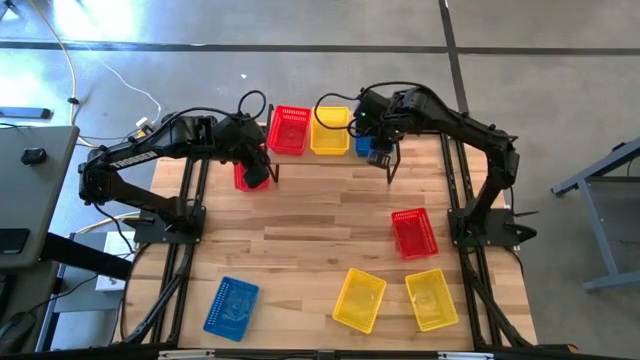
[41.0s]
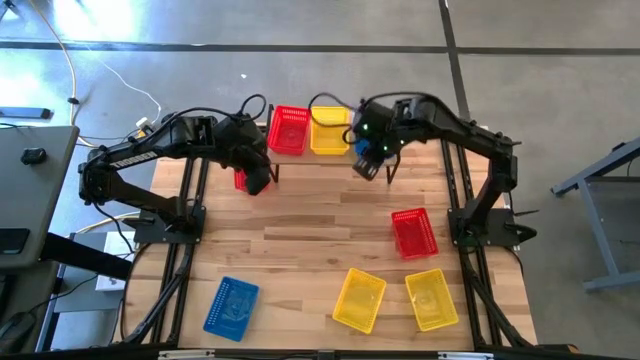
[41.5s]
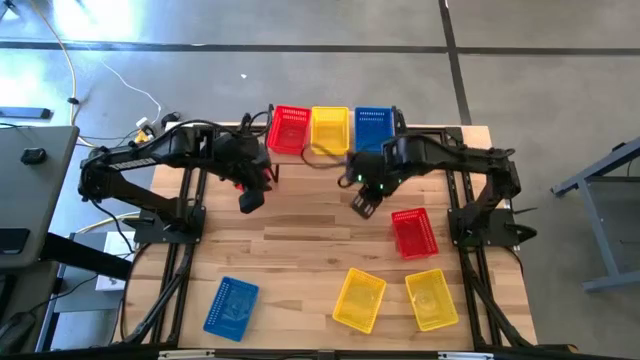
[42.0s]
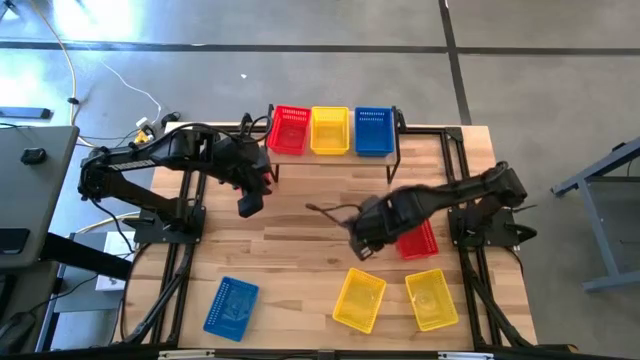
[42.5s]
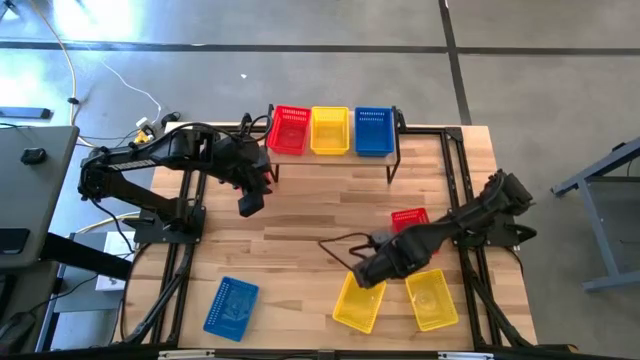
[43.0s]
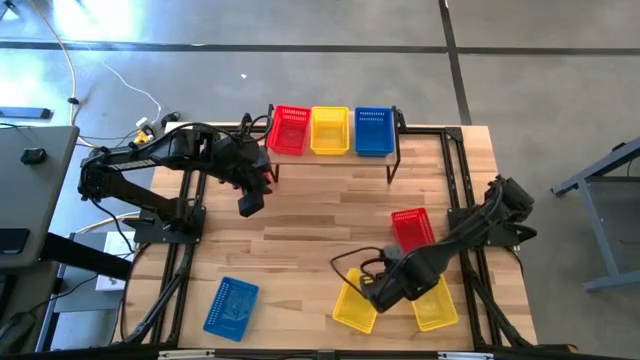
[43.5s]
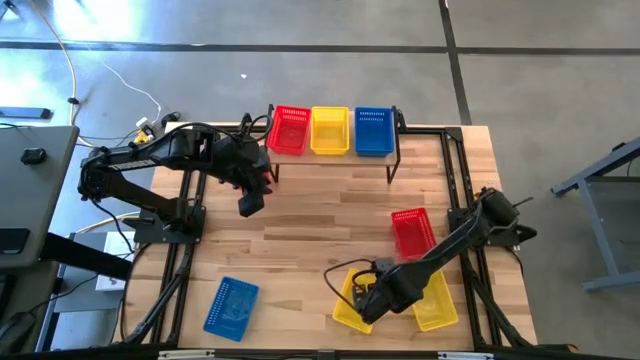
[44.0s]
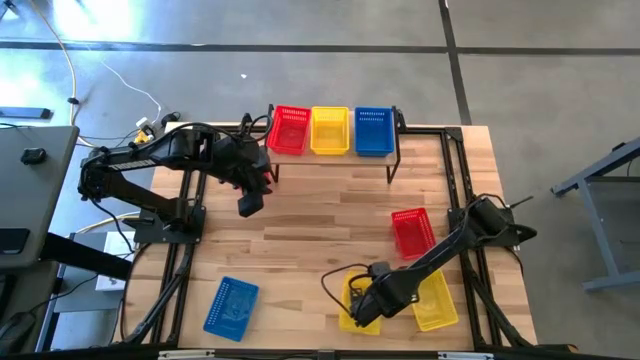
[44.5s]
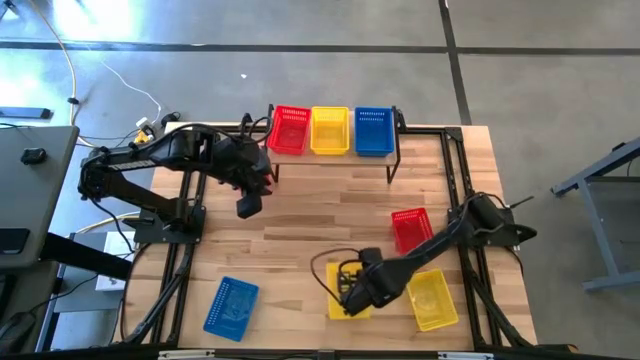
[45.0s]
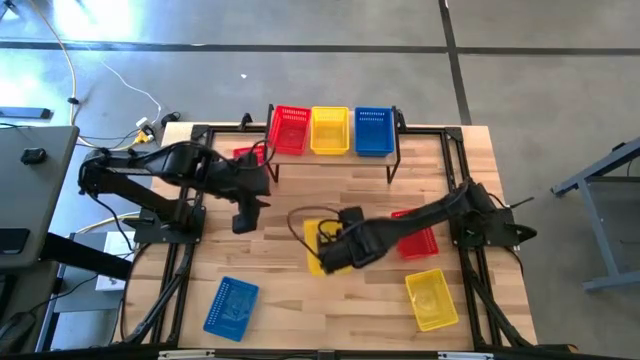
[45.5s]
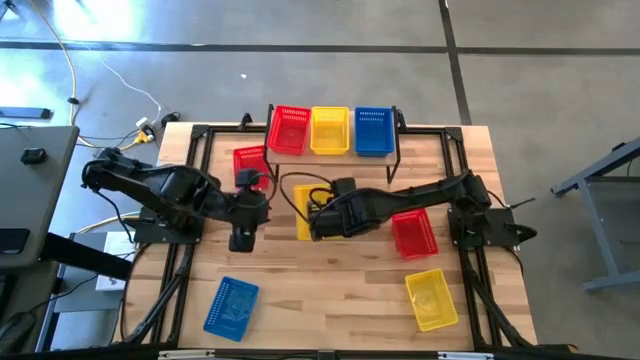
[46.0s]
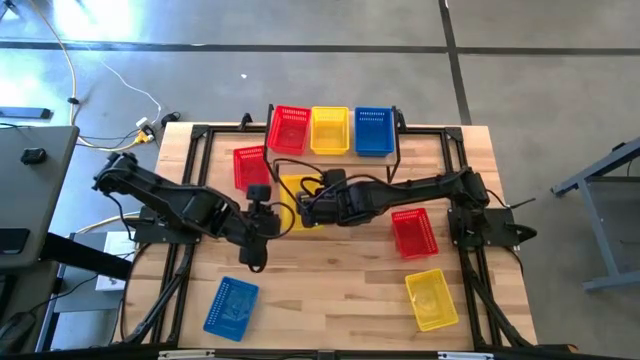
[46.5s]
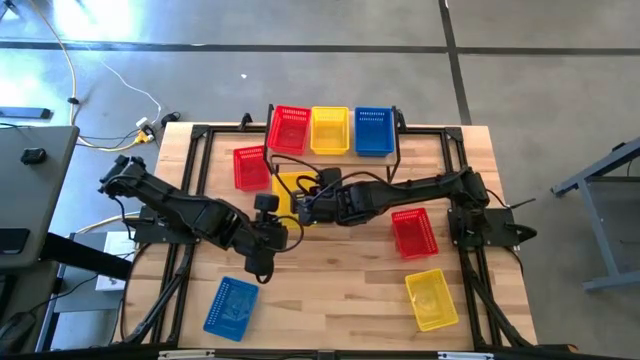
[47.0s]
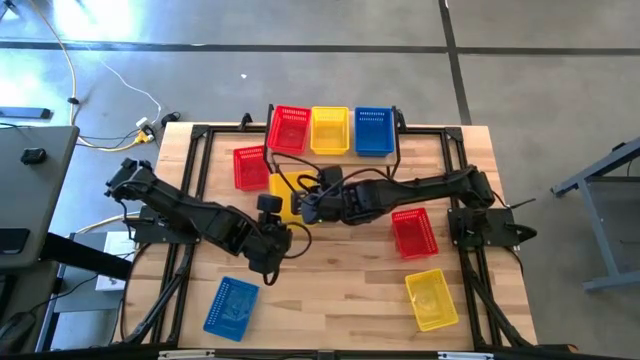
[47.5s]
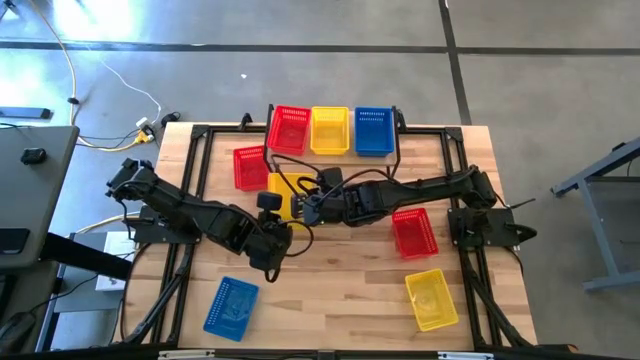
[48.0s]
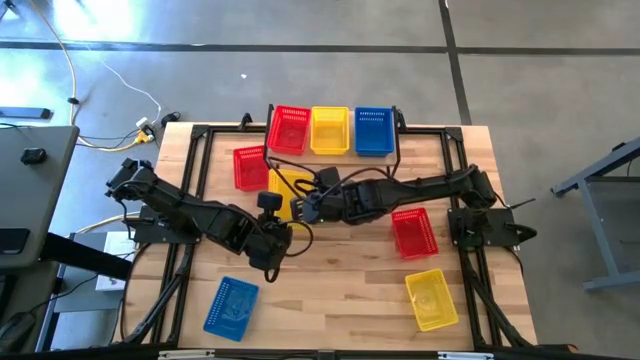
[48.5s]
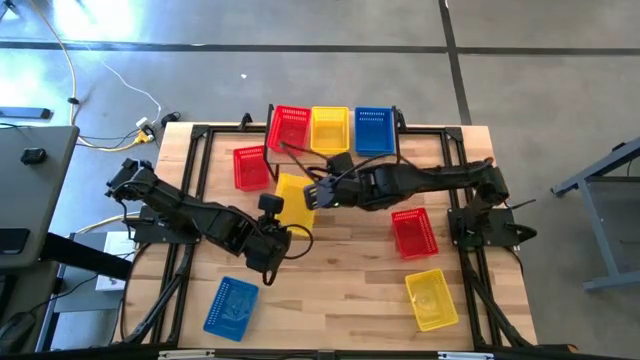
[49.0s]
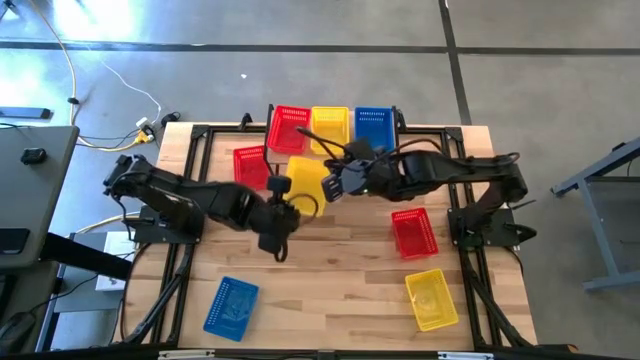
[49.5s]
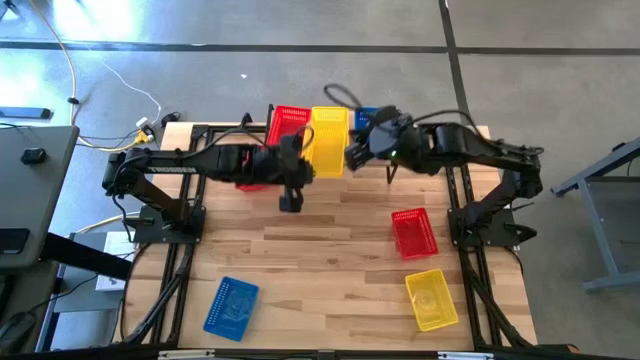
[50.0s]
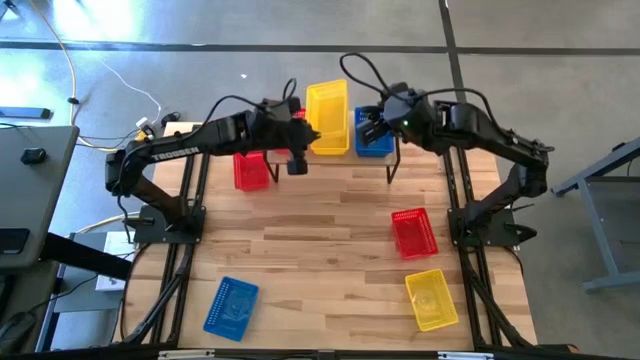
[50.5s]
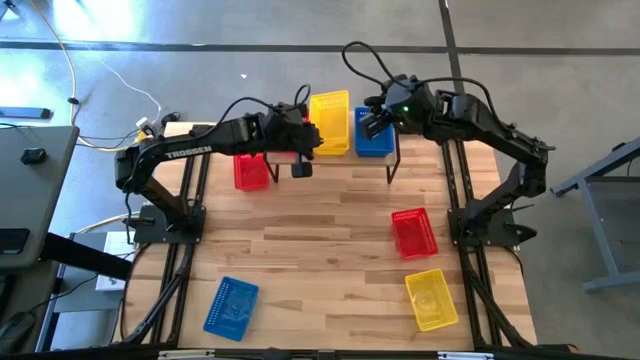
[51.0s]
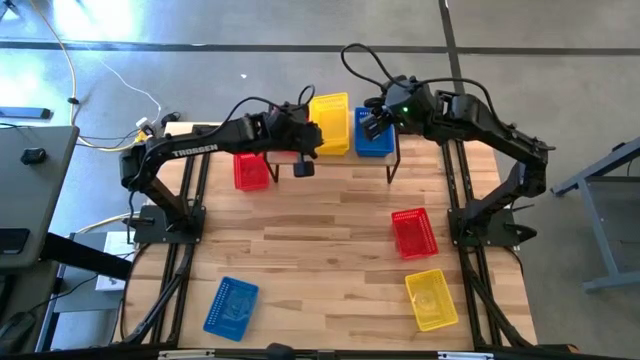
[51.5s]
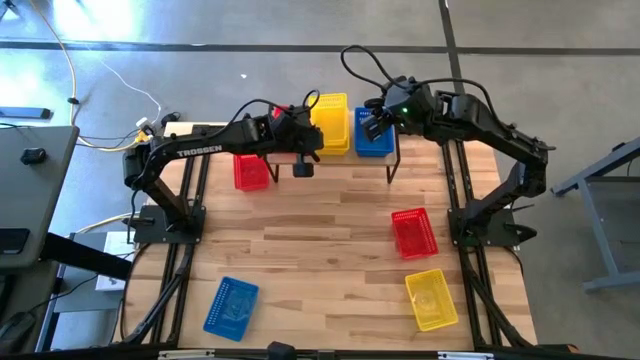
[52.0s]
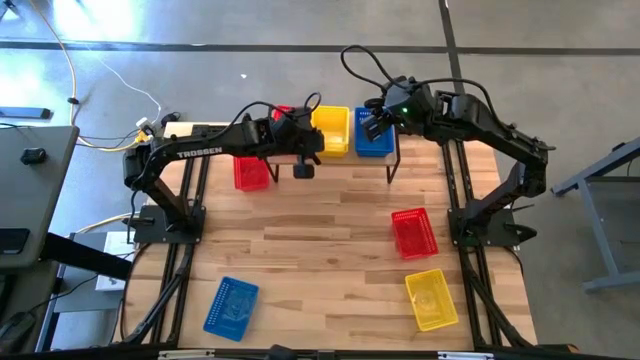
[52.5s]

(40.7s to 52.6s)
Task: Stack baskets on shelf by color
Stack the left yellow bin on the yellow bin on the shelf

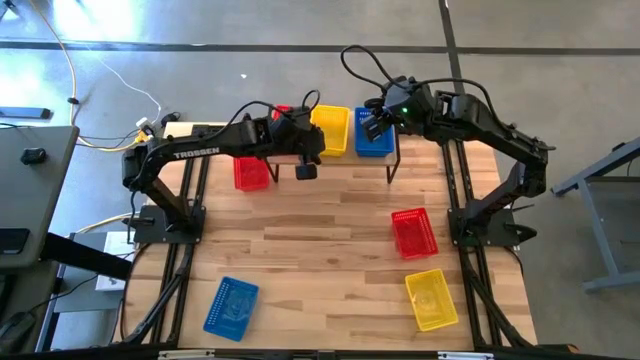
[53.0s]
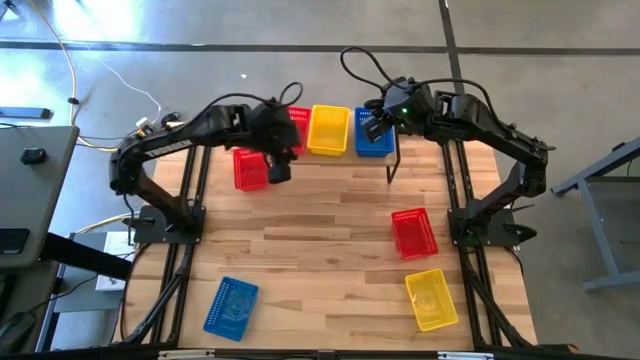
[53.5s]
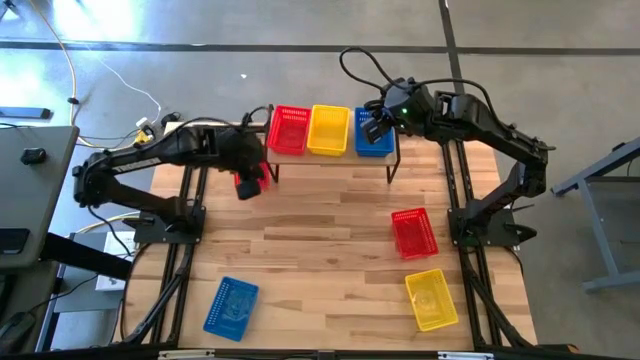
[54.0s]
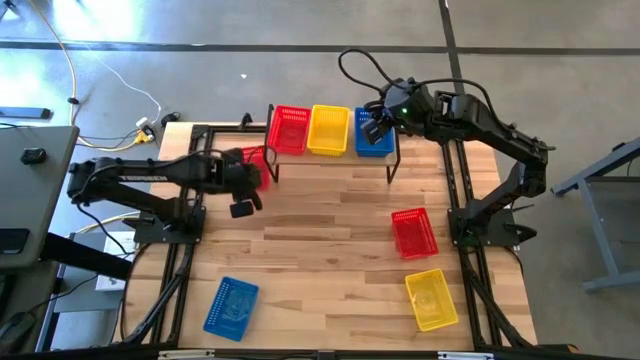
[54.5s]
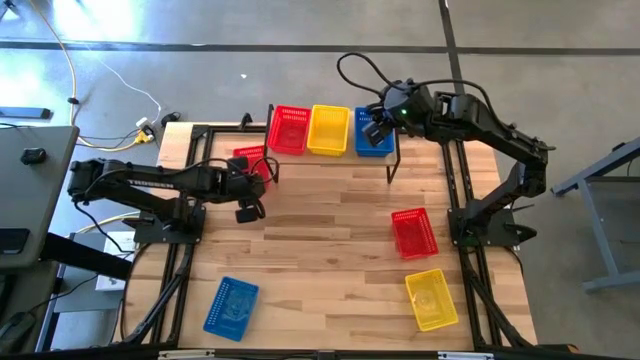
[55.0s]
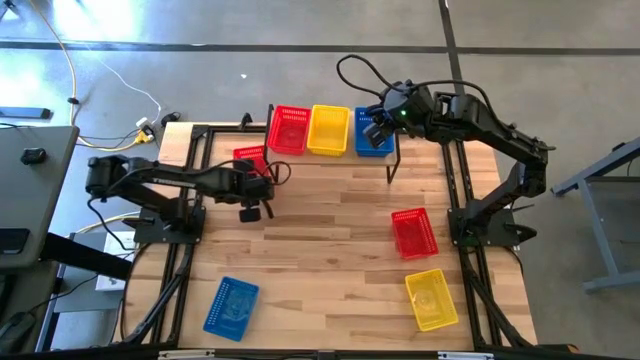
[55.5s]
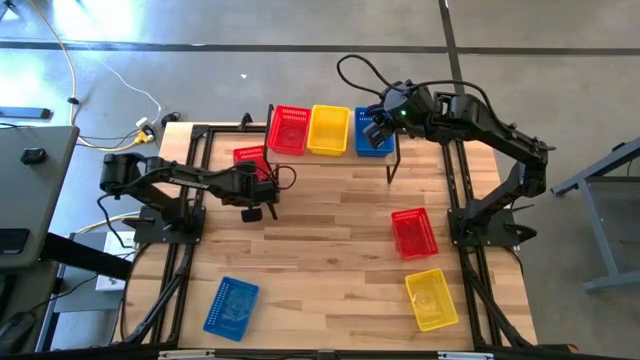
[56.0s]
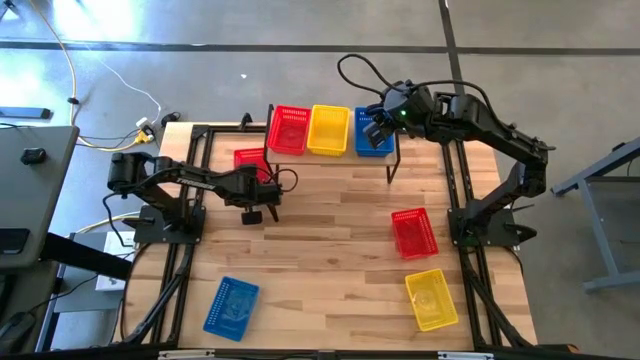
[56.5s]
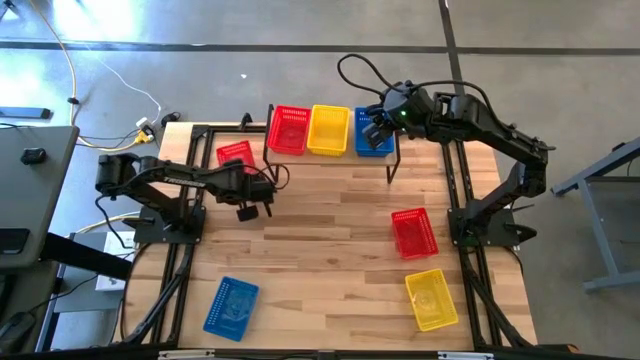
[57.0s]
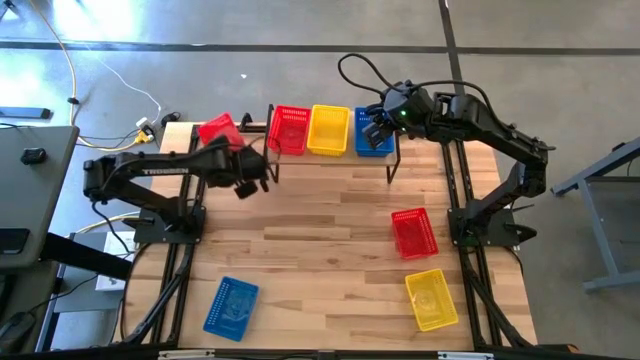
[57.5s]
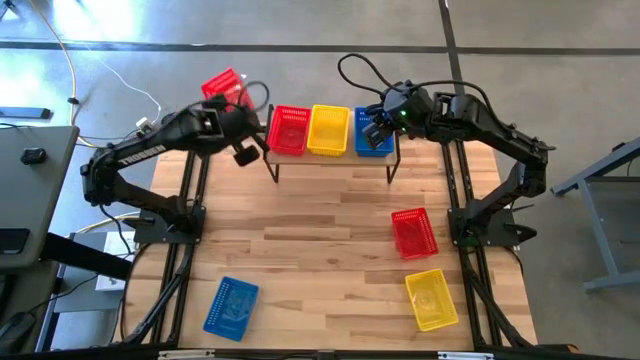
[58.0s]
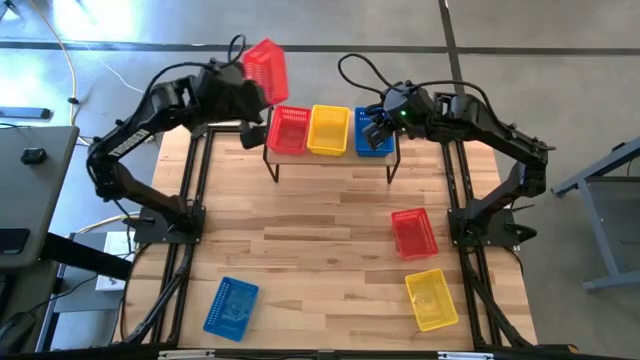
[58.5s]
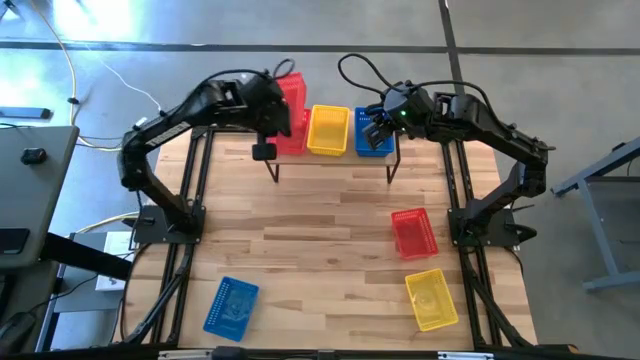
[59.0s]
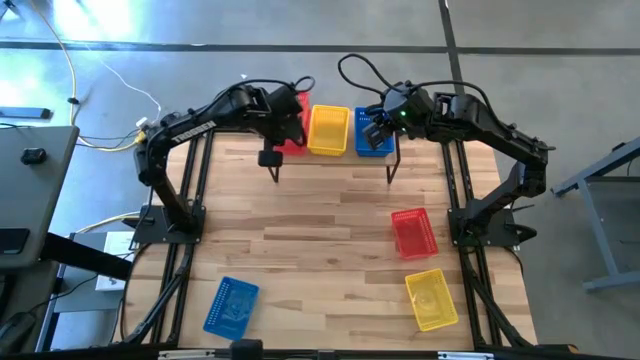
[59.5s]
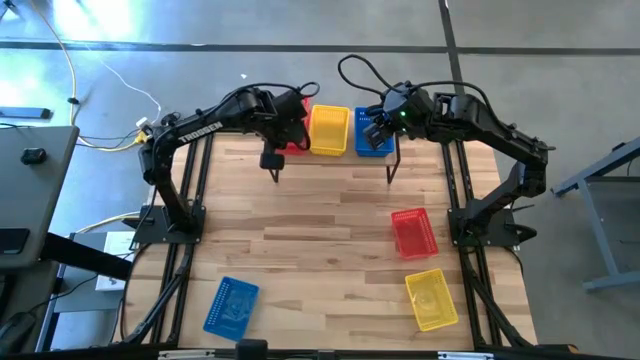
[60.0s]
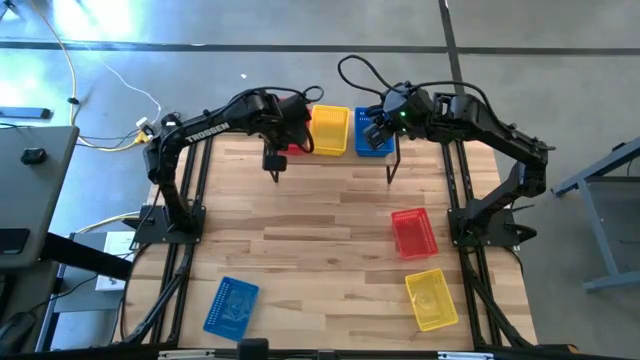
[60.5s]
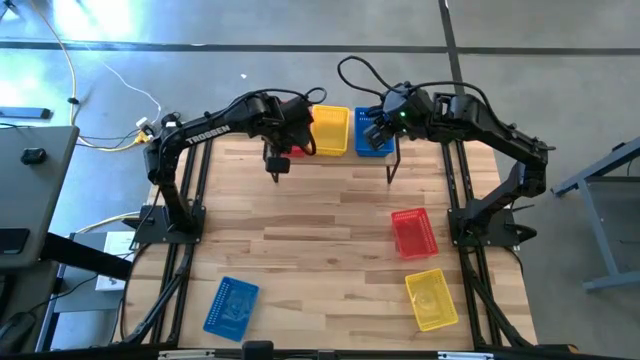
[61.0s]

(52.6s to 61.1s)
Stack the top red bin on the red bin on the shelf
